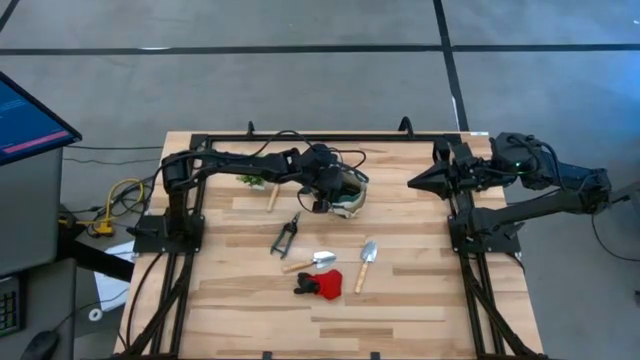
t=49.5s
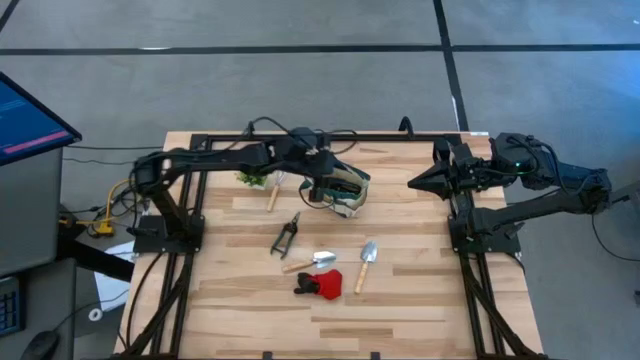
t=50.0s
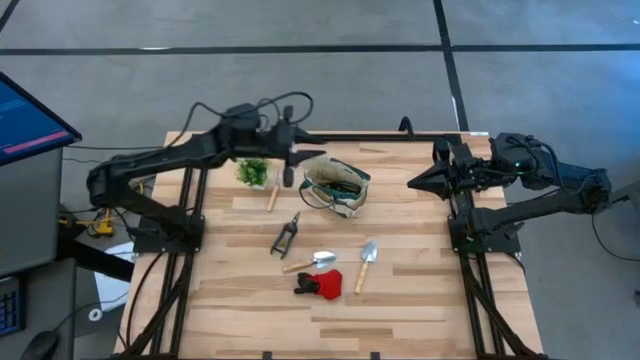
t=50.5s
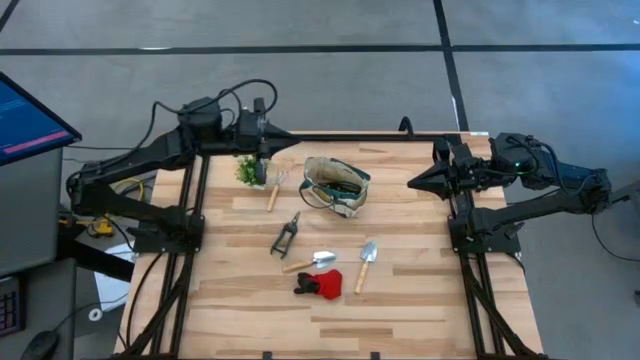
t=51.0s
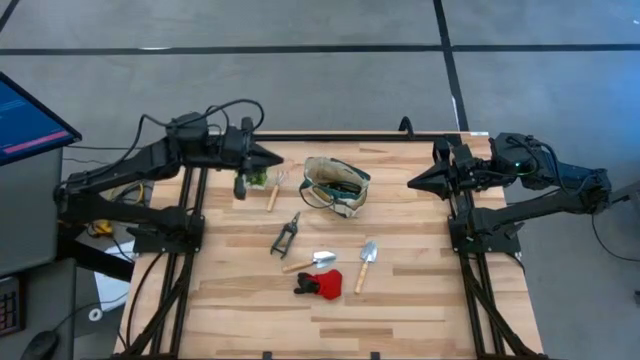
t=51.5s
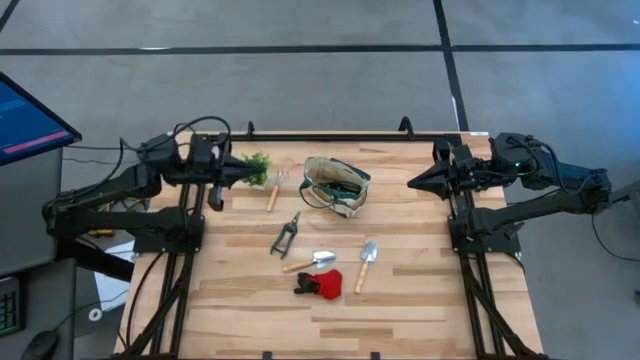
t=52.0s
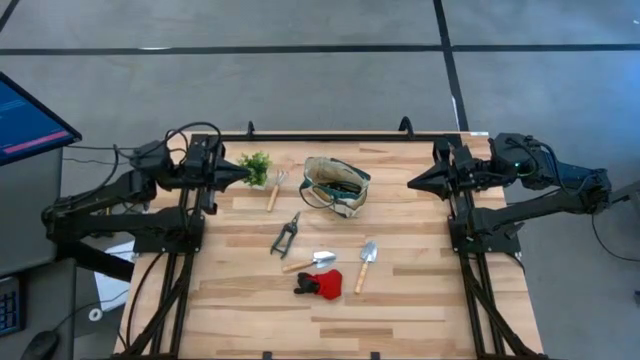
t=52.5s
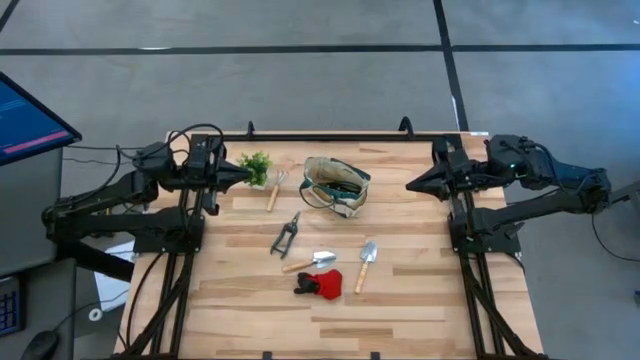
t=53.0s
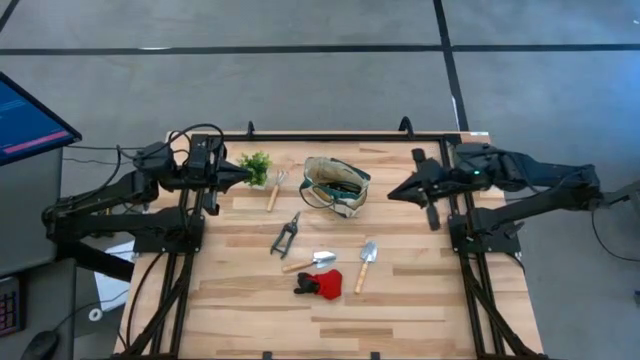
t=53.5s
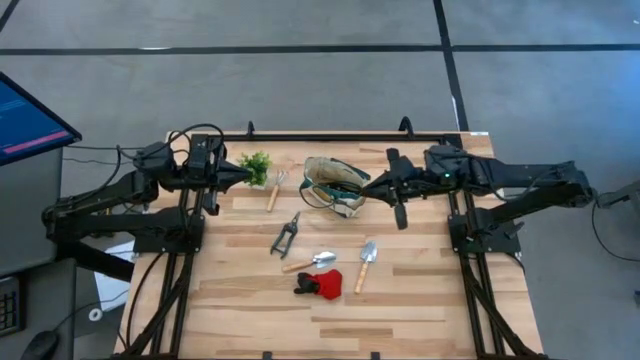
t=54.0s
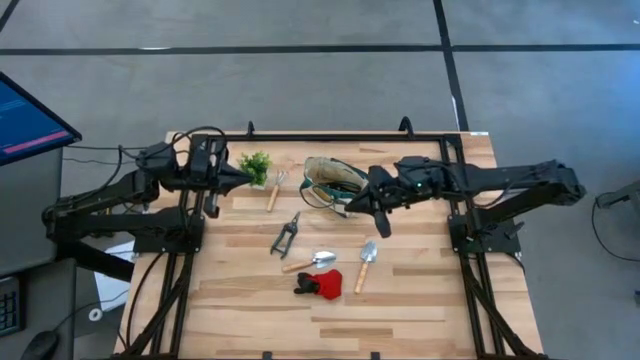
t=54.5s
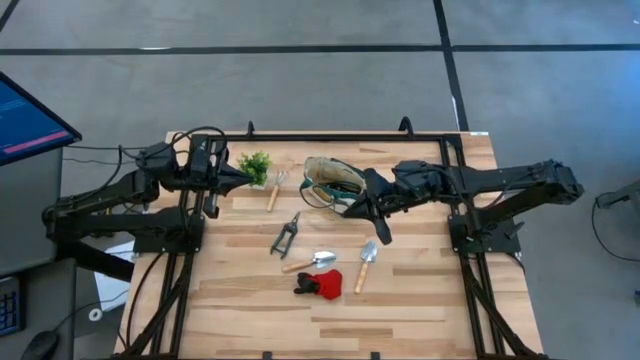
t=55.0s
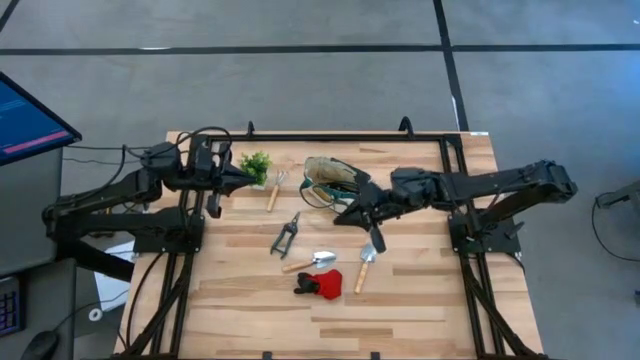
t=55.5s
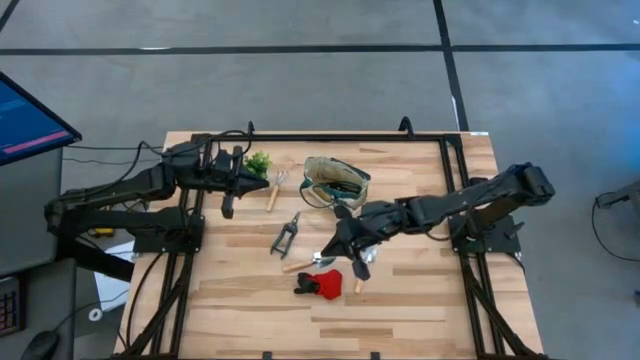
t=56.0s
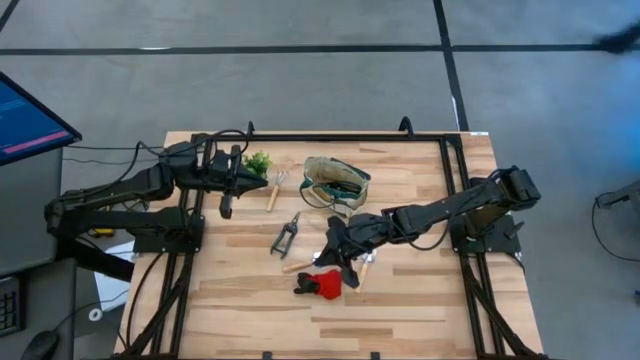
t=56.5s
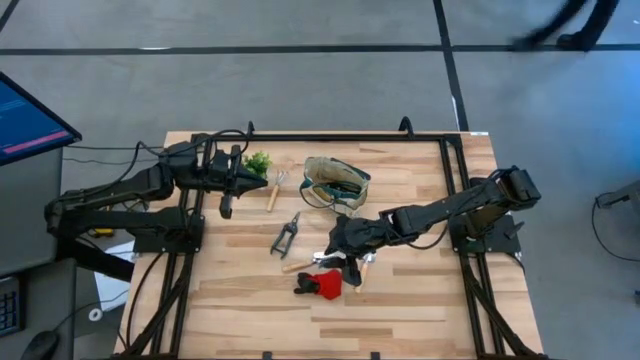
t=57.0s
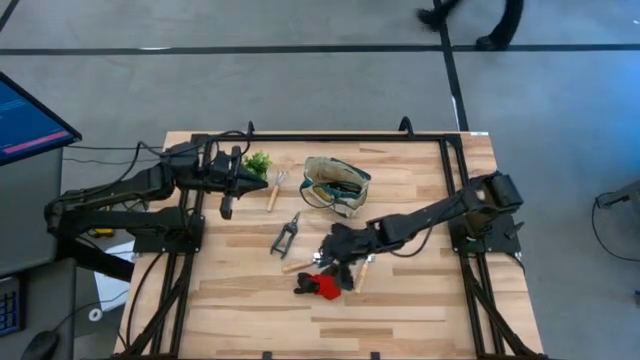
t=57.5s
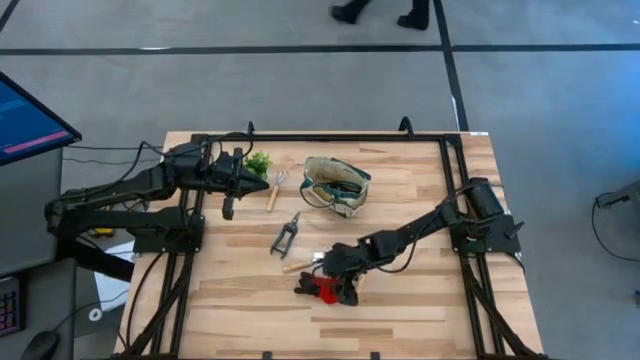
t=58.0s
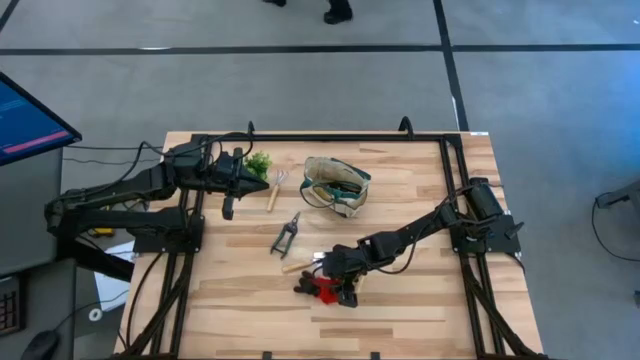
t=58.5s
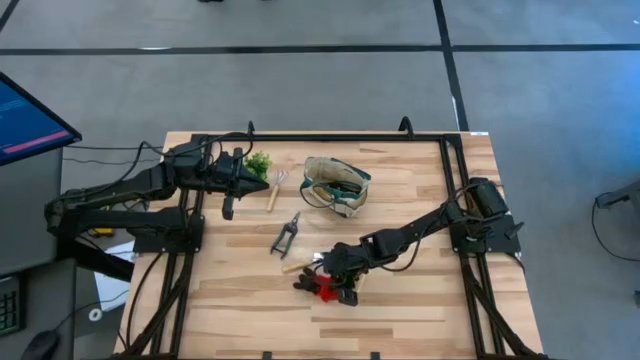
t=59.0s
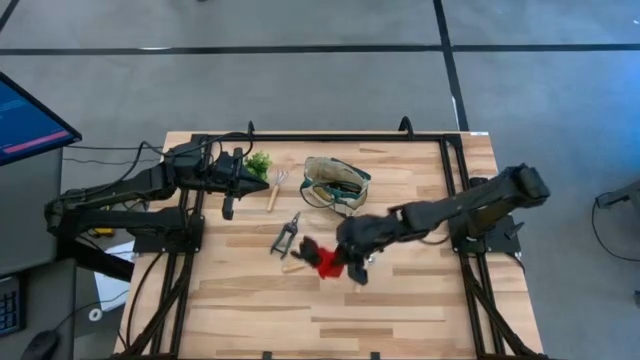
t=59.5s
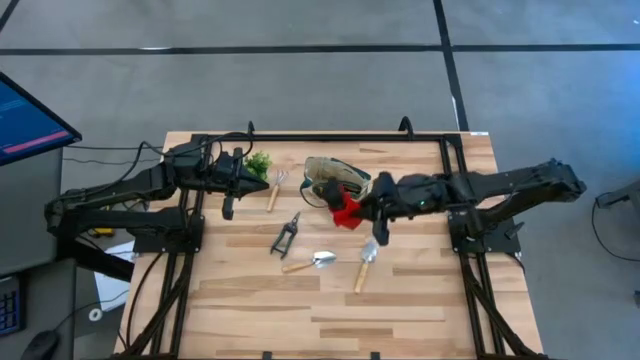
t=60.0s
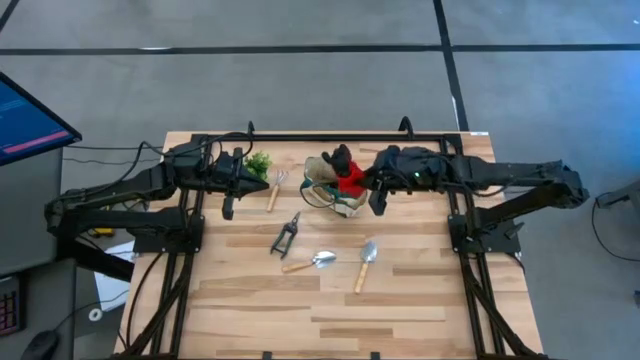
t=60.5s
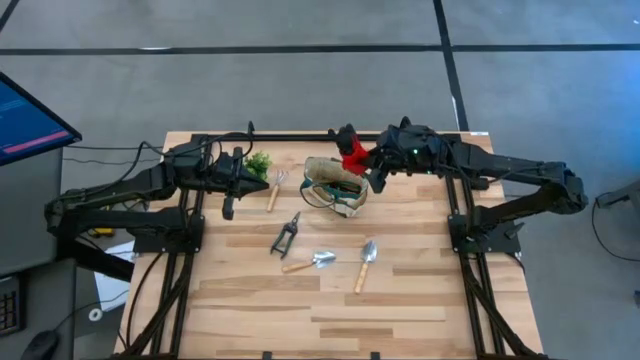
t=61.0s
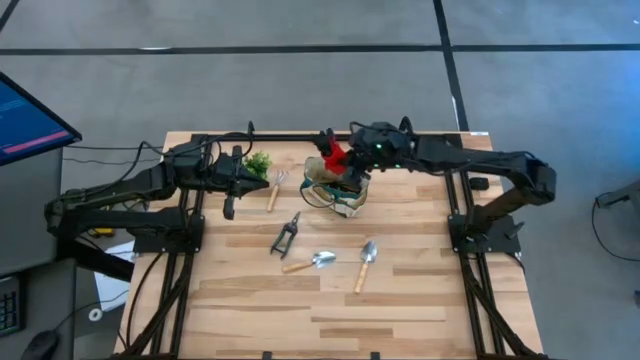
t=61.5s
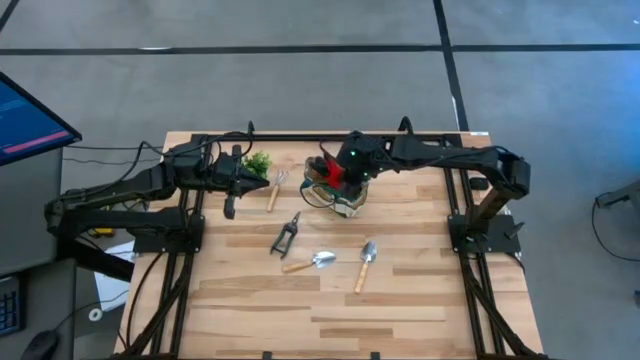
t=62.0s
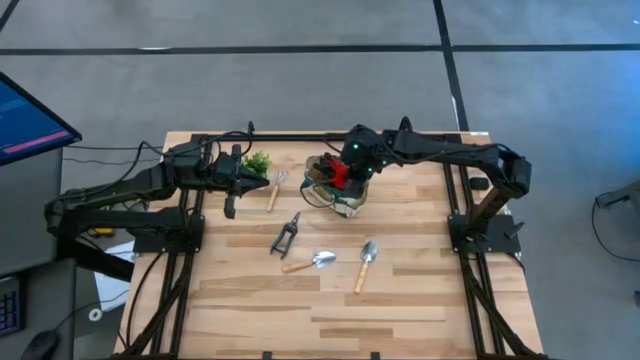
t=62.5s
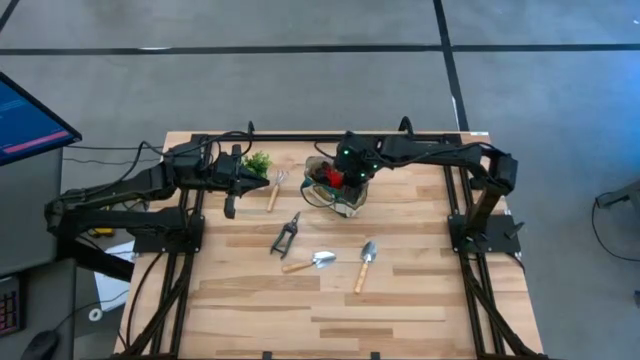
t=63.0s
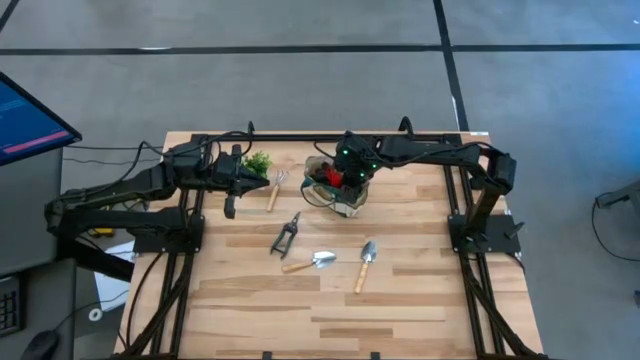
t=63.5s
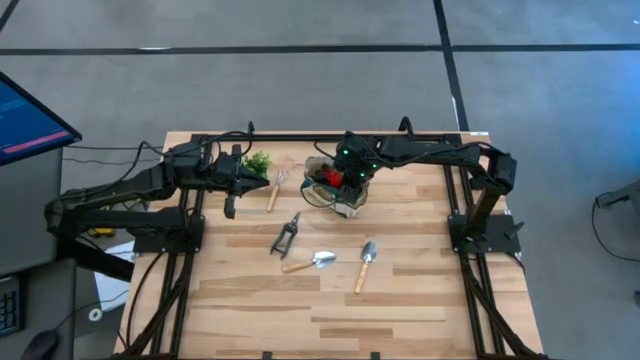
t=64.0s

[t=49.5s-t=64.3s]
Task: Pick & Place Garden tools in Gardening bag
Put the red gloves into the gardening bag

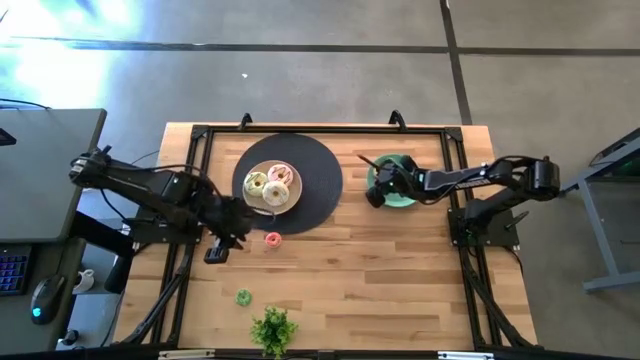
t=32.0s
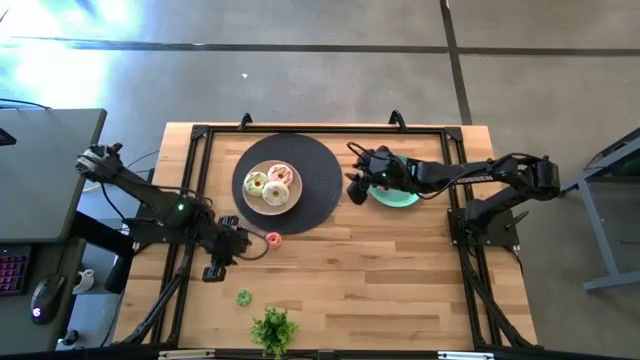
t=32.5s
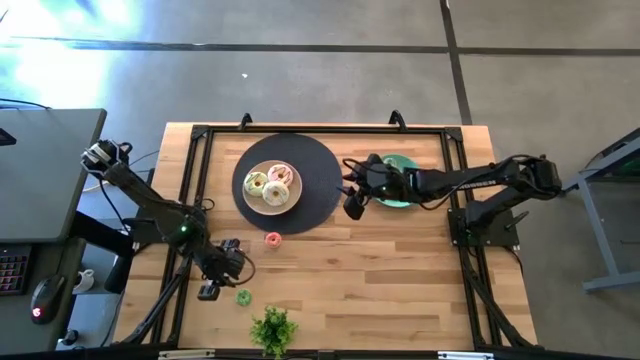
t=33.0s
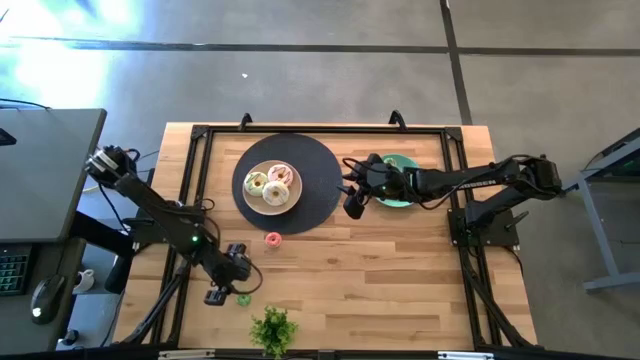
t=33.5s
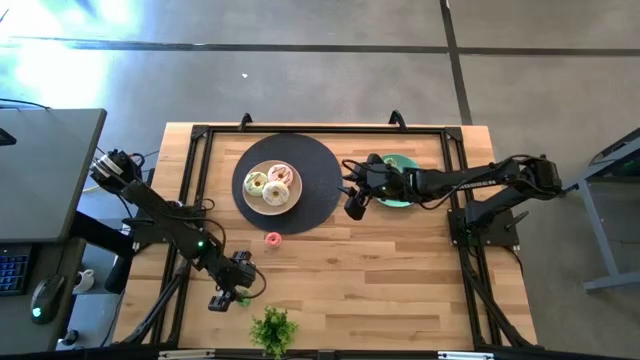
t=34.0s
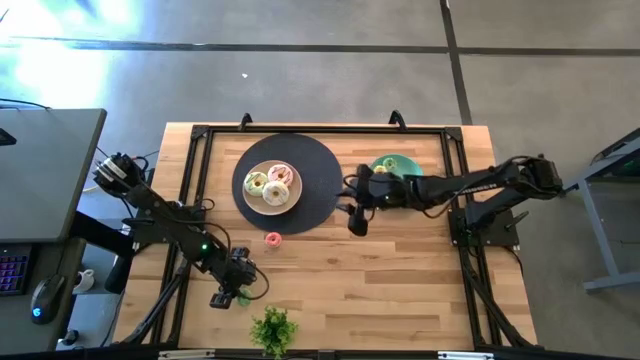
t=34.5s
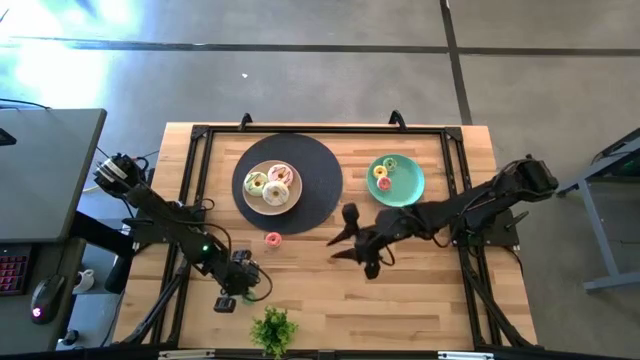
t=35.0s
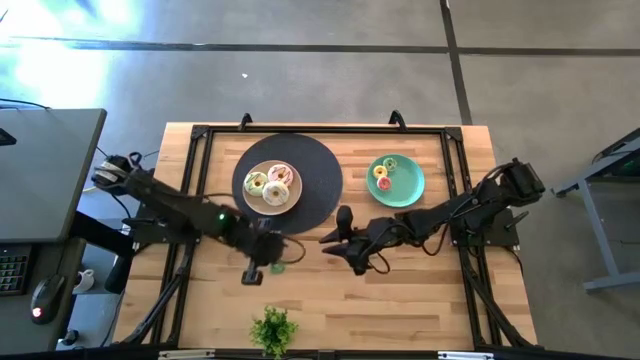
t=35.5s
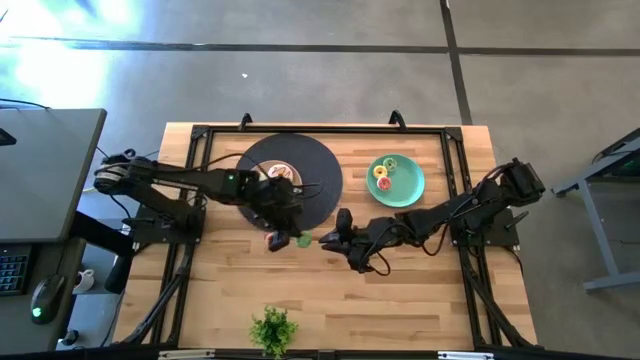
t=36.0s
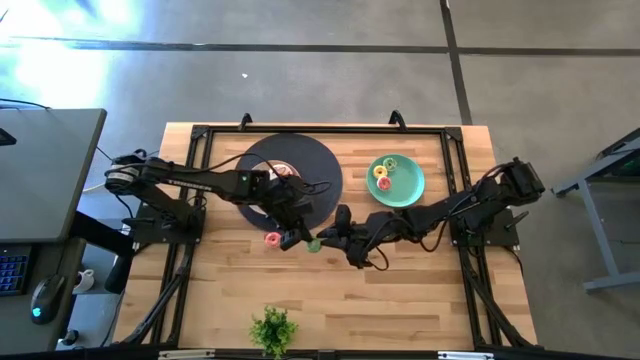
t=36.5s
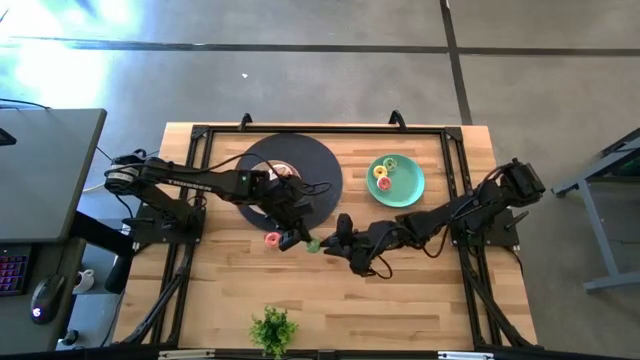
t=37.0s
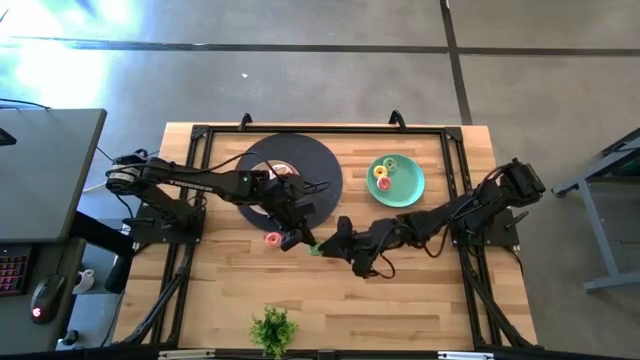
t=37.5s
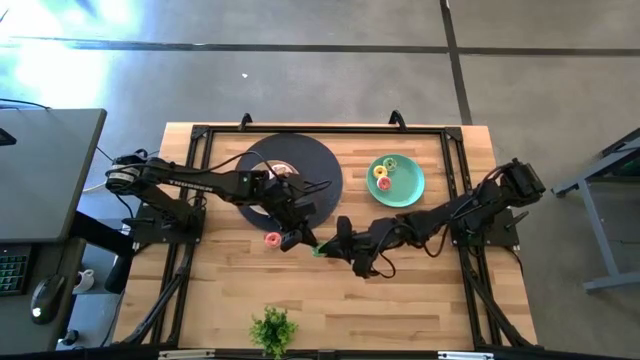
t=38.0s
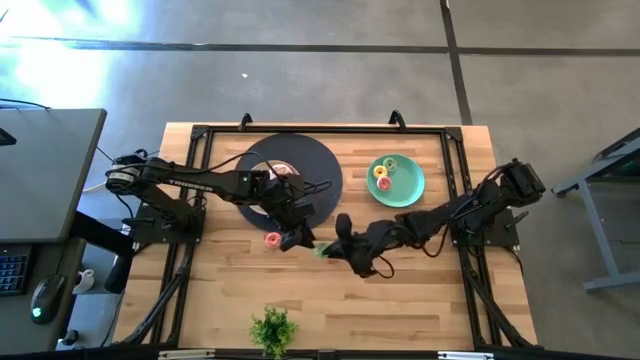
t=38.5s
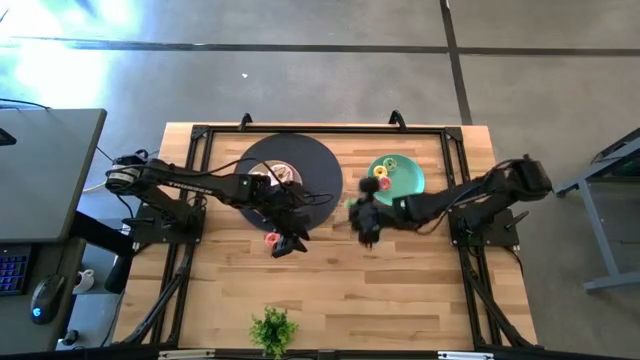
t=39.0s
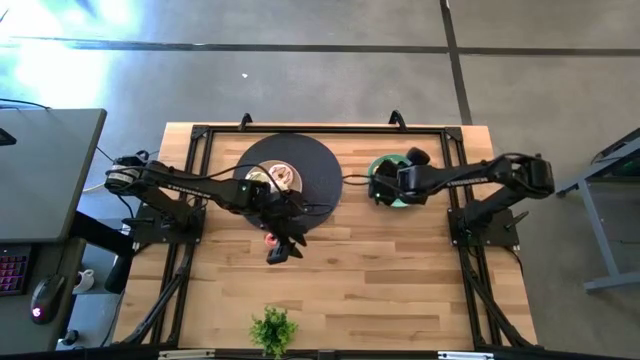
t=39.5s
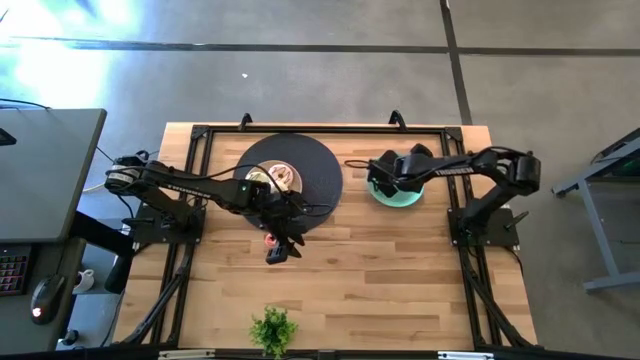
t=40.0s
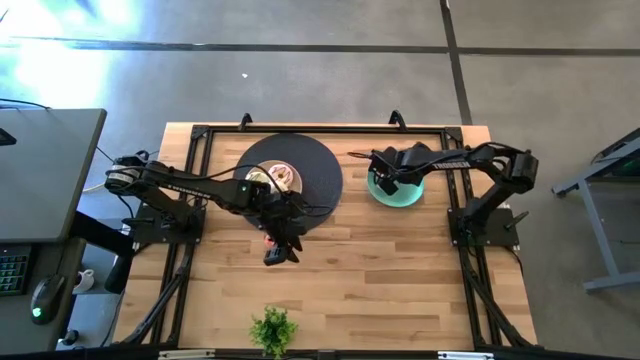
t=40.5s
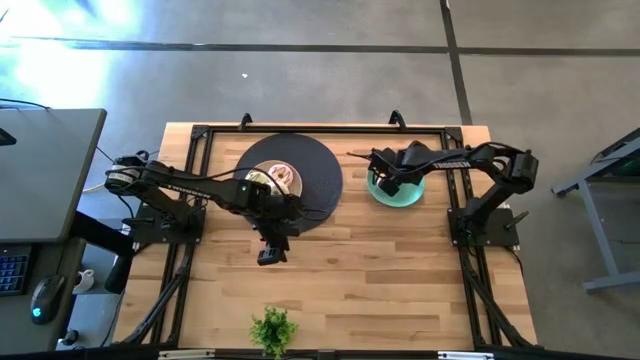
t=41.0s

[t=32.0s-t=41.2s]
Task: Pick & Place donuts
Put the small green donut on the green plate
